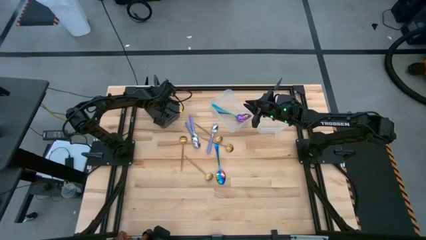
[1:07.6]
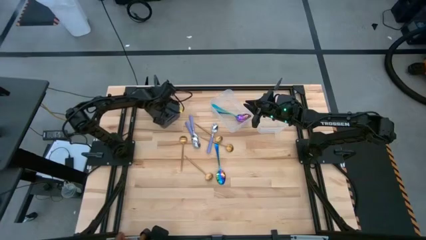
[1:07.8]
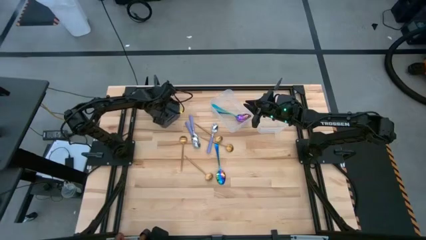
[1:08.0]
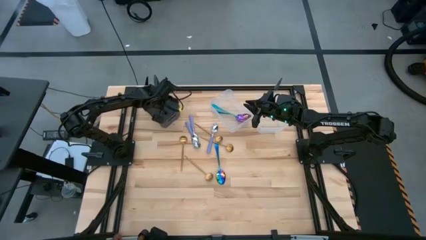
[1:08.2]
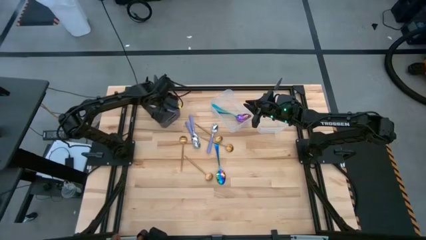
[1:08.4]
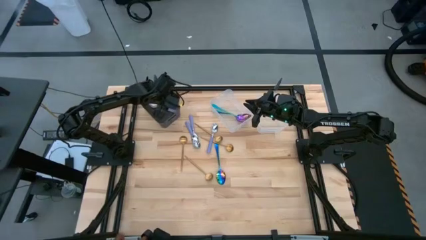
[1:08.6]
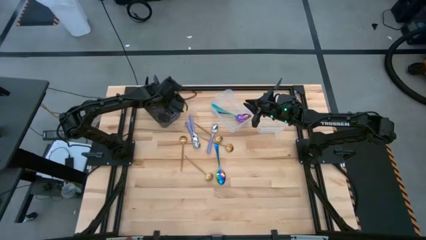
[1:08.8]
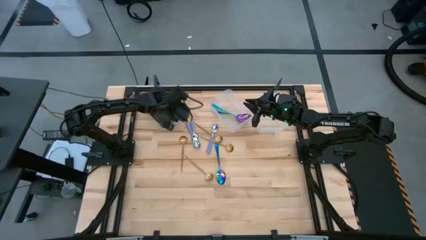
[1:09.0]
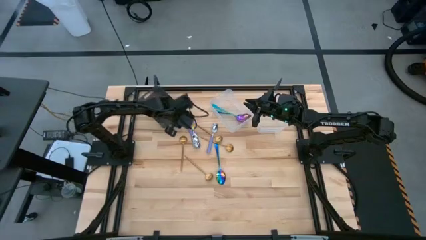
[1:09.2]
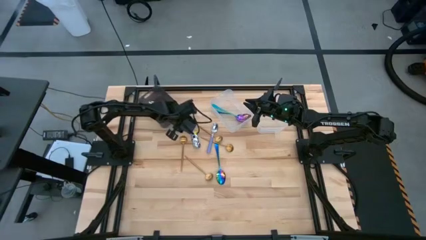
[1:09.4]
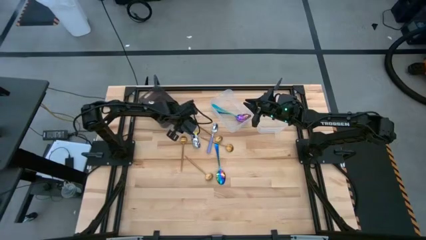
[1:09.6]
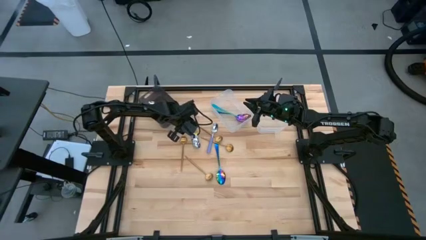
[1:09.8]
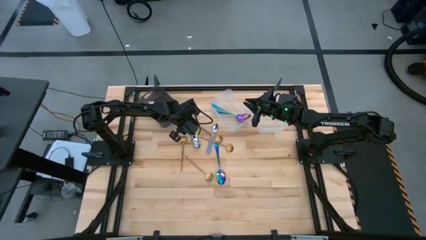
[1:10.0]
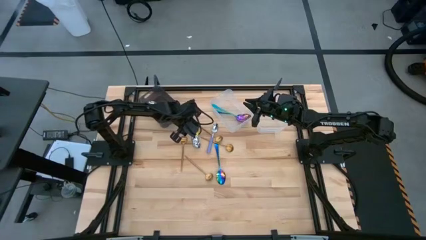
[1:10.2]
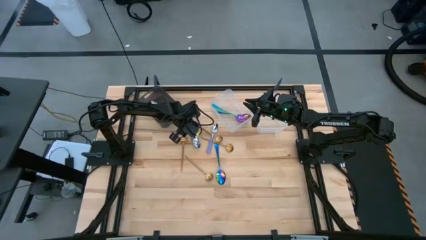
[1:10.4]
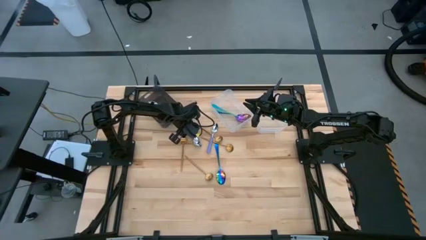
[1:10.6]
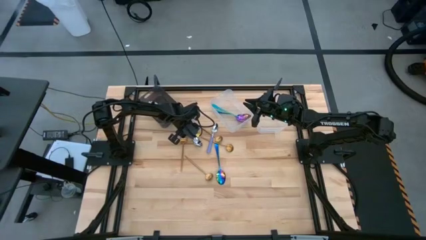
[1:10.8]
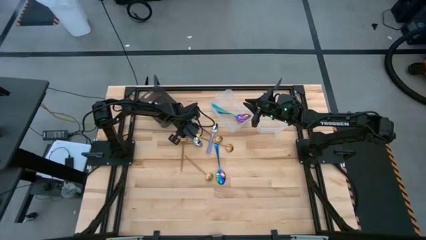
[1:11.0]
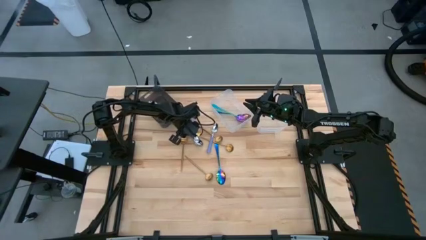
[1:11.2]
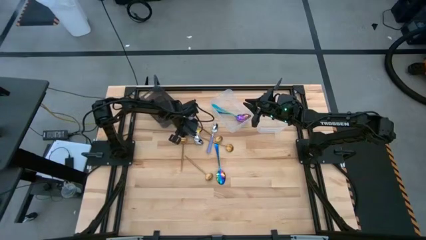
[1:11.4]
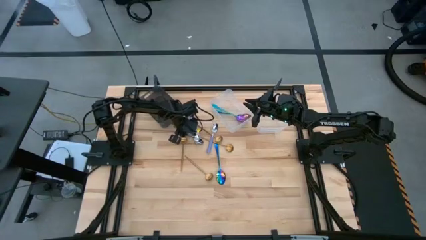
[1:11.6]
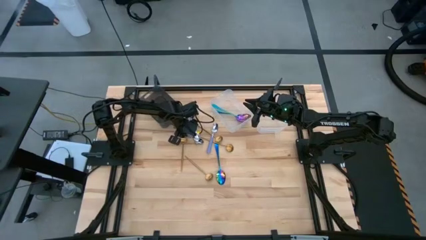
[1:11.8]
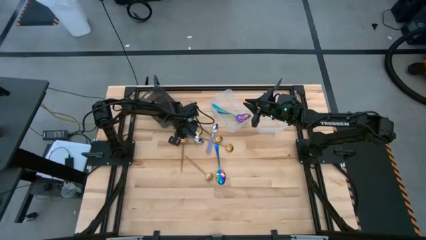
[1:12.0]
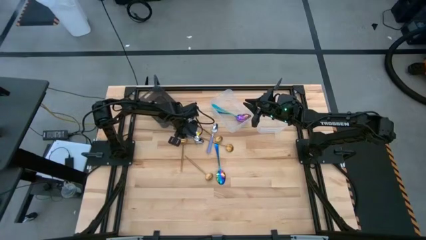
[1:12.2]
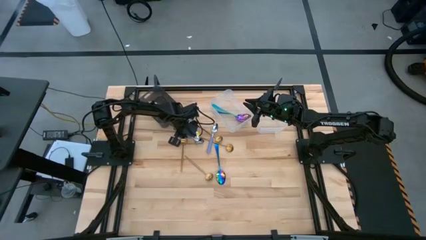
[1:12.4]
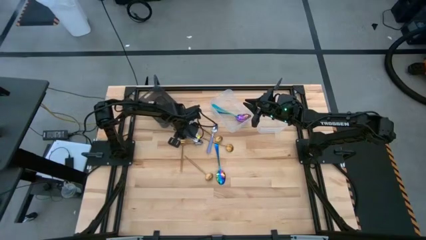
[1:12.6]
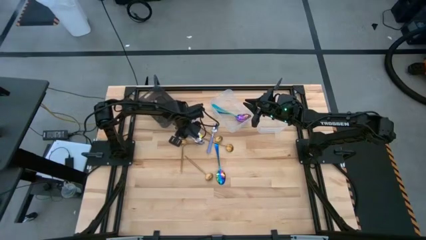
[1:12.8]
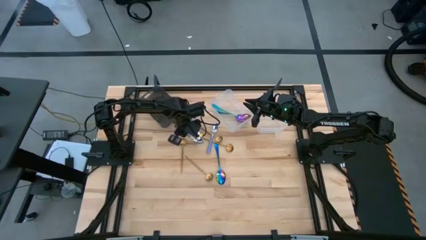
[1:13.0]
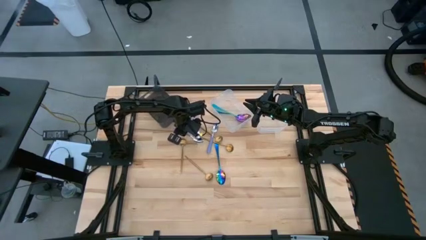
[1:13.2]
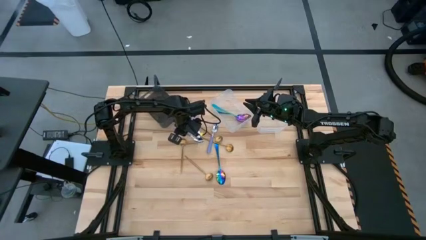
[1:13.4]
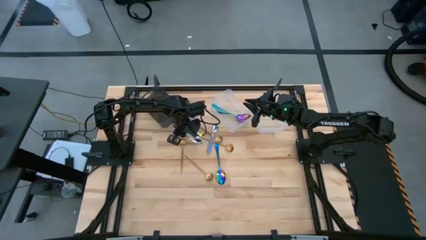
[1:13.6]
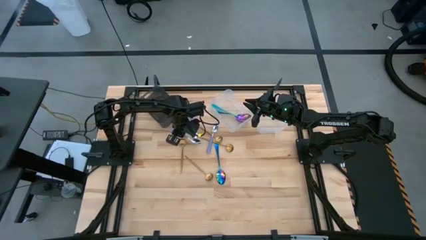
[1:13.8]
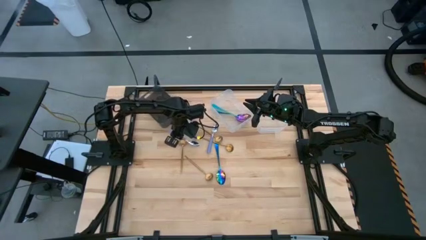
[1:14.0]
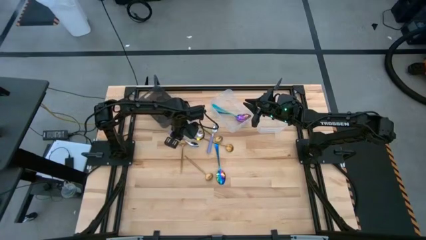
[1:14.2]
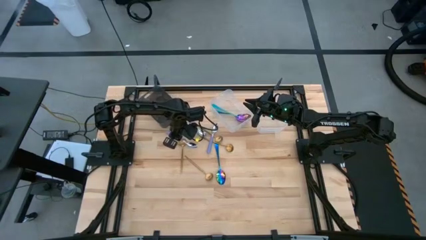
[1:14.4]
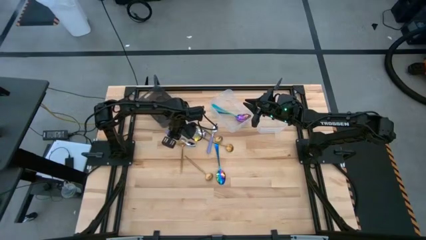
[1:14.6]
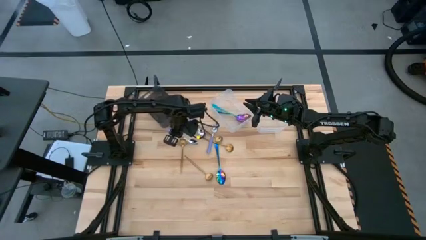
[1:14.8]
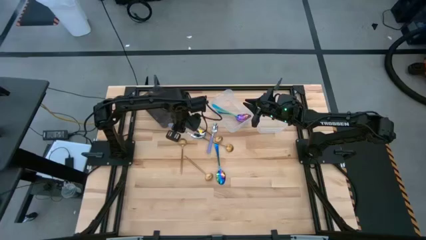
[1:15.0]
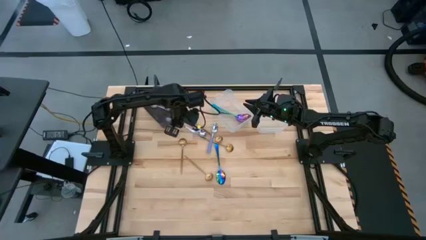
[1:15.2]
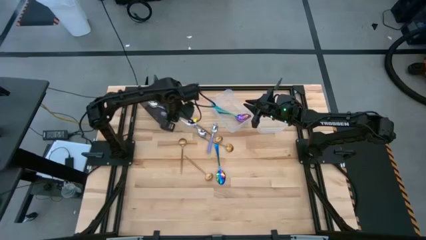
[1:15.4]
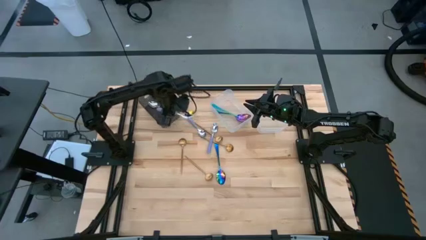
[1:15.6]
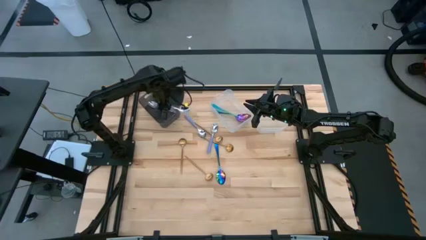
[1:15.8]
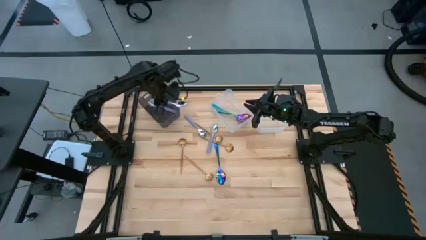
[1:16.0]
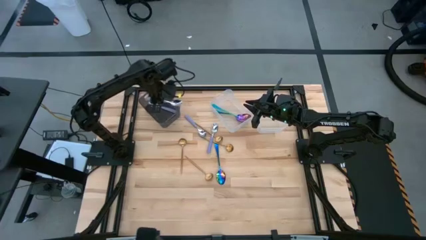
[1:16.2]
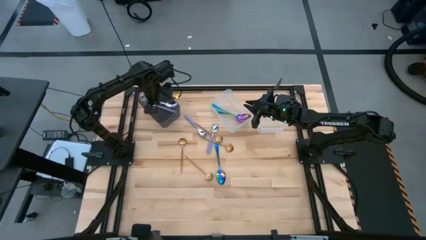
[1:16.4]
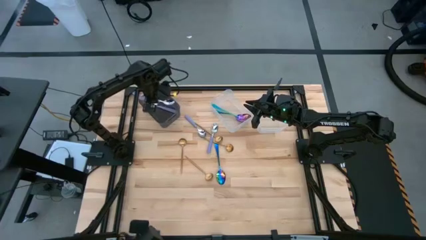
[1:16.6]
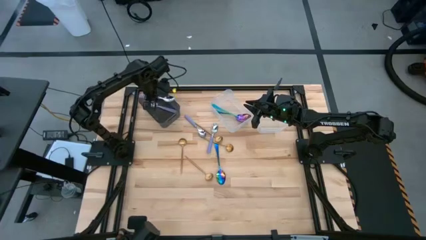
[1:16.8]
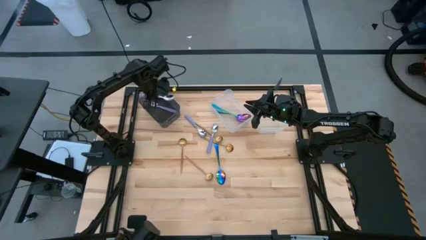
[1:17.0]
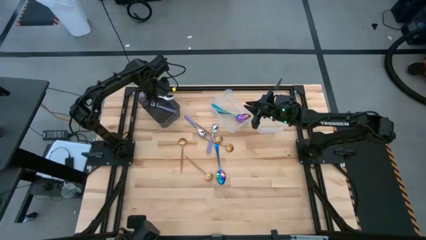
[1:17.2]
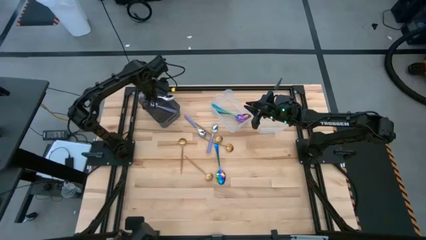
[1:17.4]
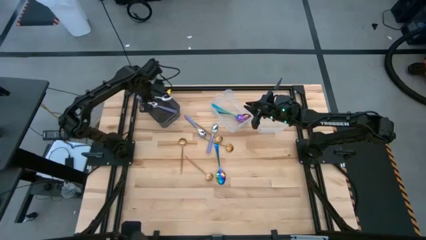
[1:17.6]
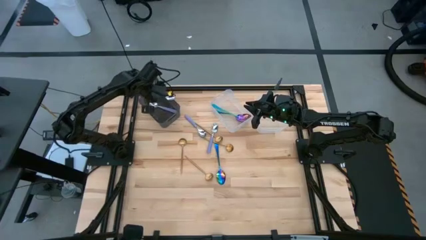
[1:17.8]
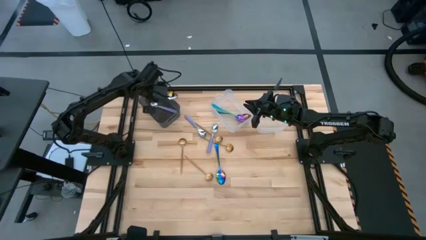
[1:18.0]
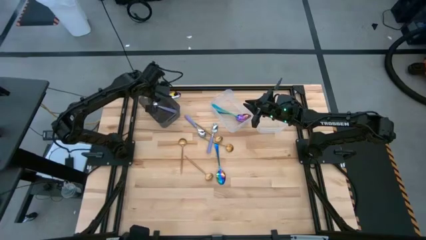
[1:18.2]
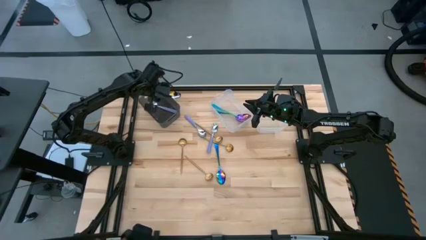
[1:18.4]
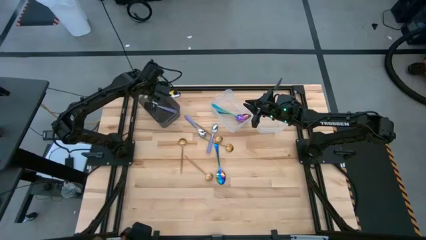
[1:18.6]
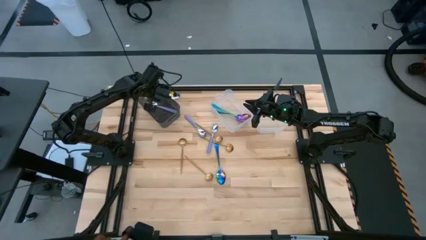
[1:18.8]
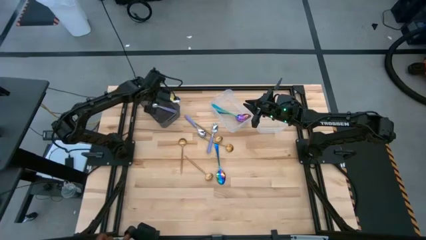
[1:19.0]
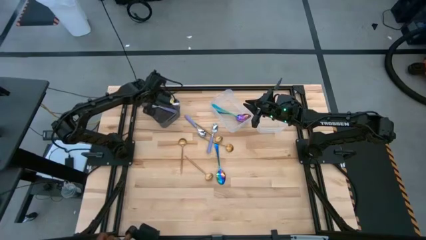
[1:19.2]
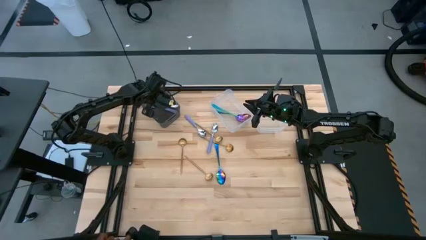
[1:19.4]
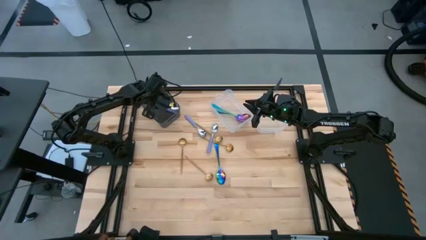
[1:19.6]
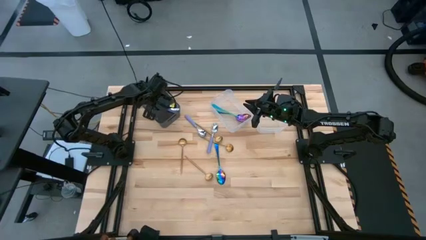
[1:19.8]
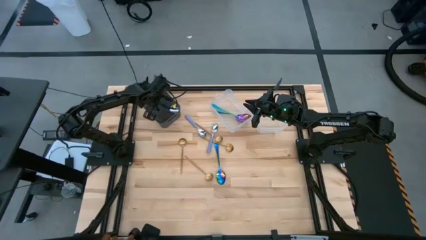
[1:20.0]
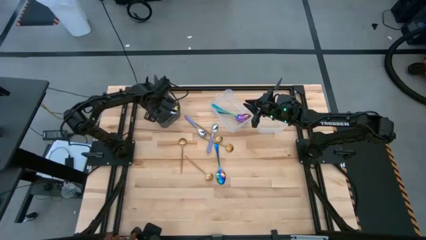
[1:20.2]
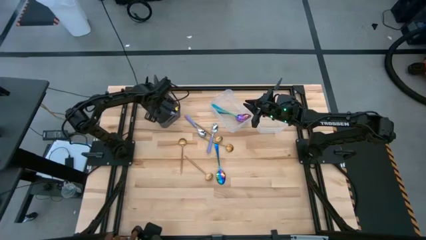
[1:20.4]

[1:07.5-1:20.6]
Task: Sort silverware by color (type)
Put the purple spoon into the black bin
